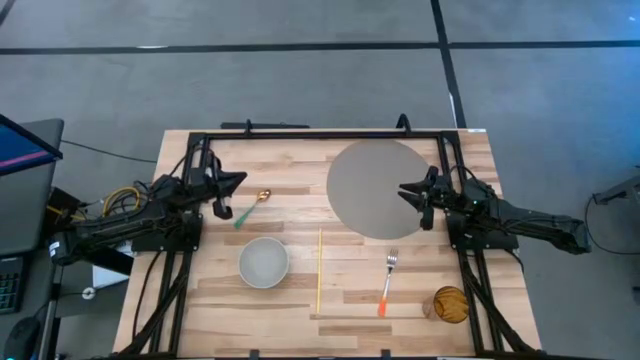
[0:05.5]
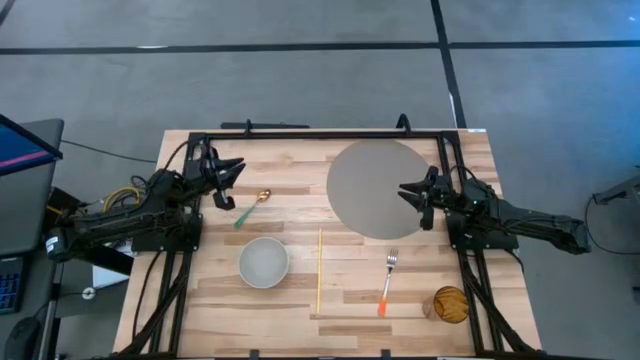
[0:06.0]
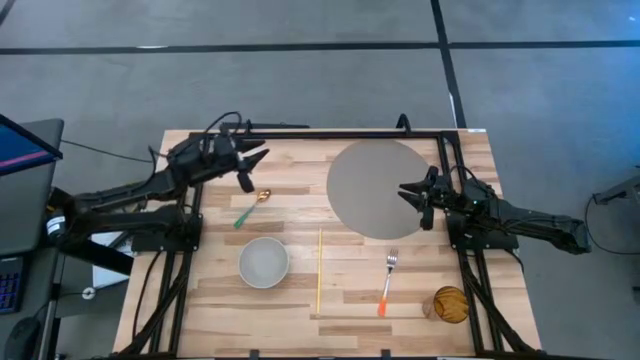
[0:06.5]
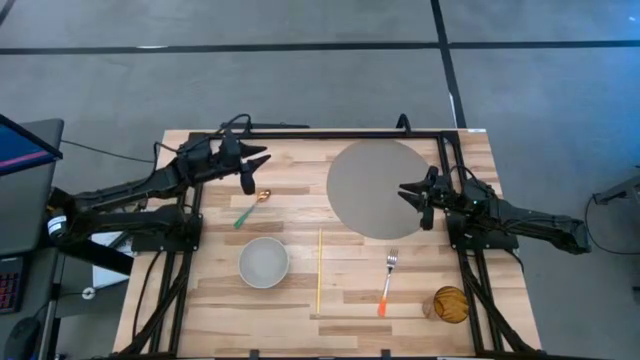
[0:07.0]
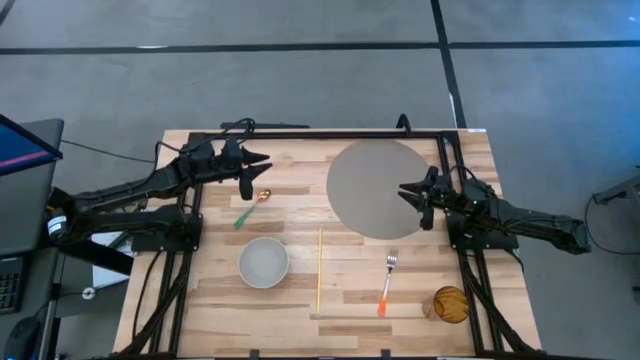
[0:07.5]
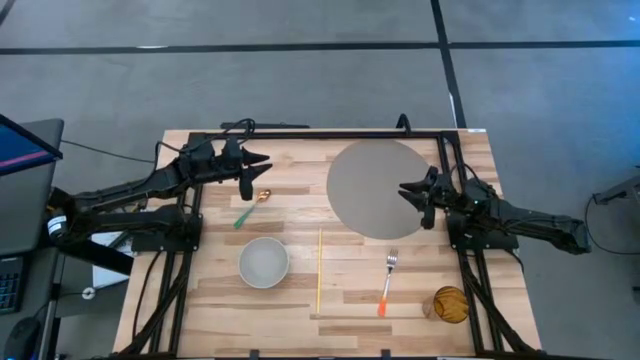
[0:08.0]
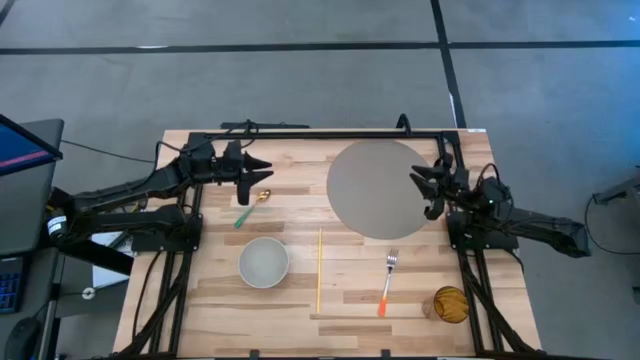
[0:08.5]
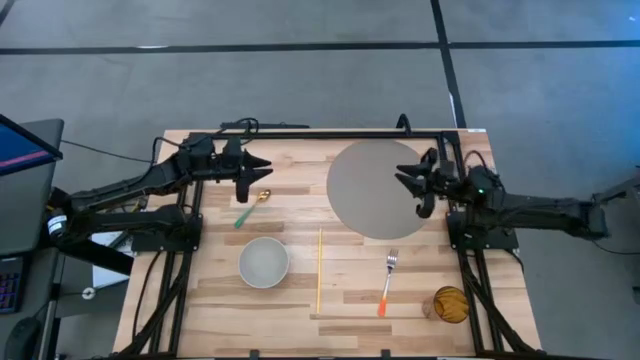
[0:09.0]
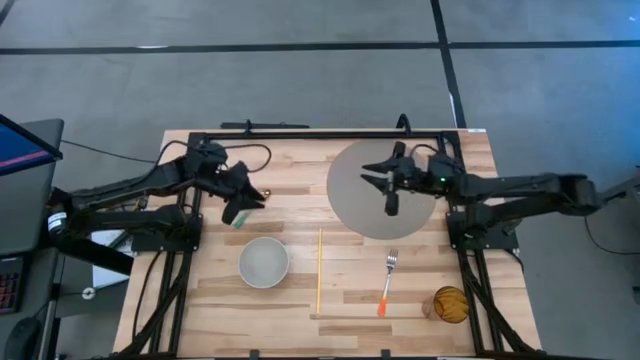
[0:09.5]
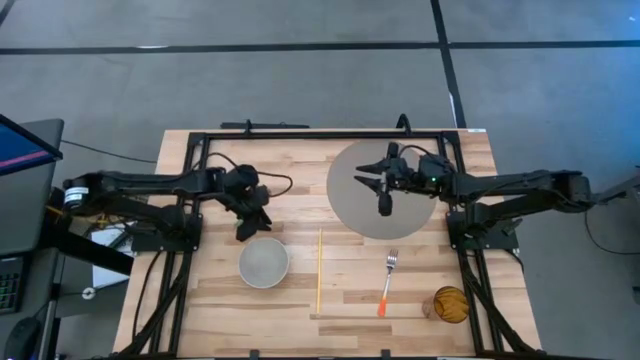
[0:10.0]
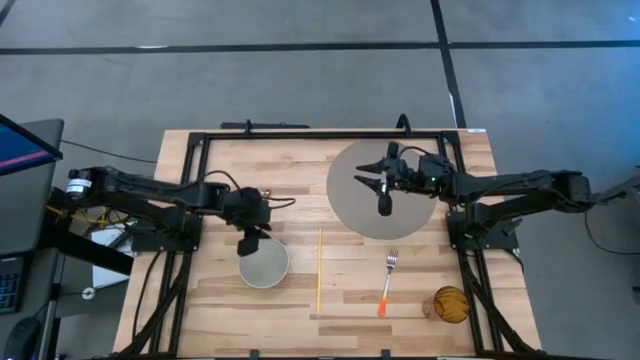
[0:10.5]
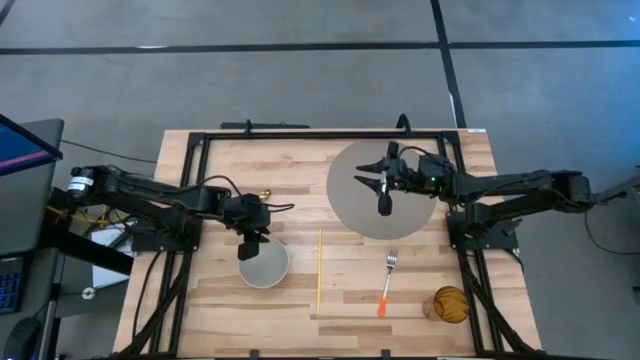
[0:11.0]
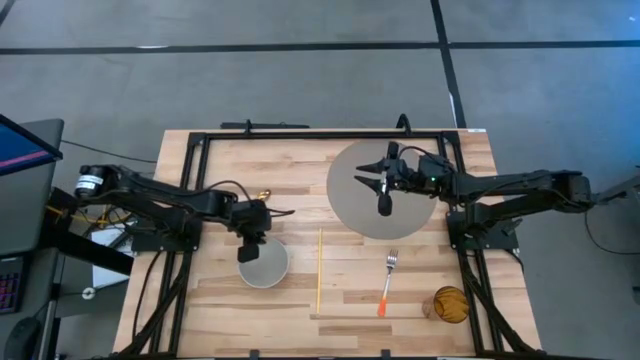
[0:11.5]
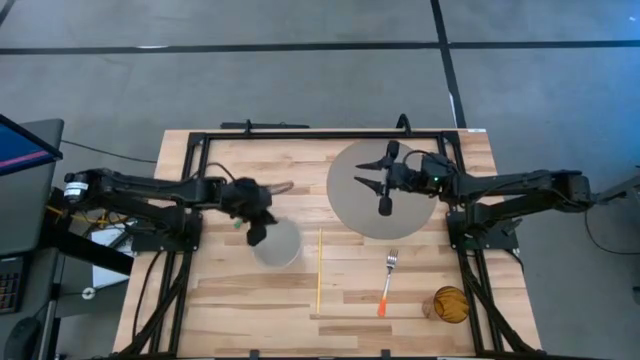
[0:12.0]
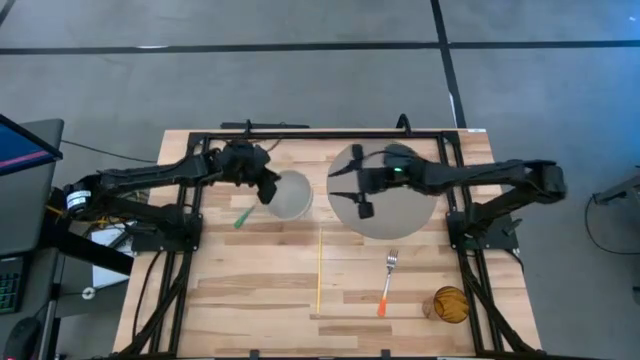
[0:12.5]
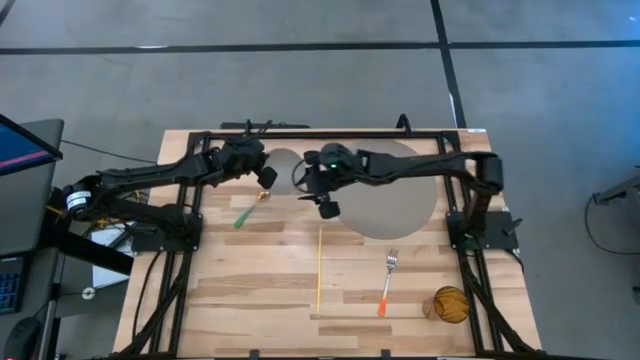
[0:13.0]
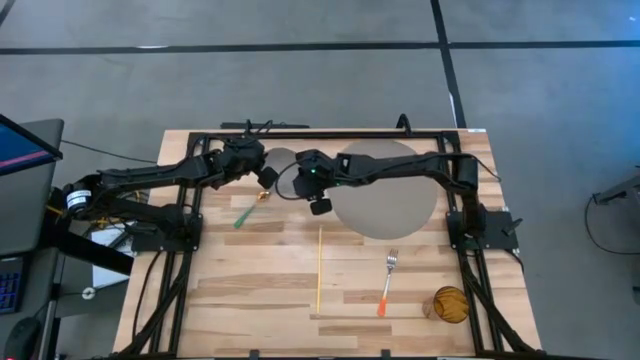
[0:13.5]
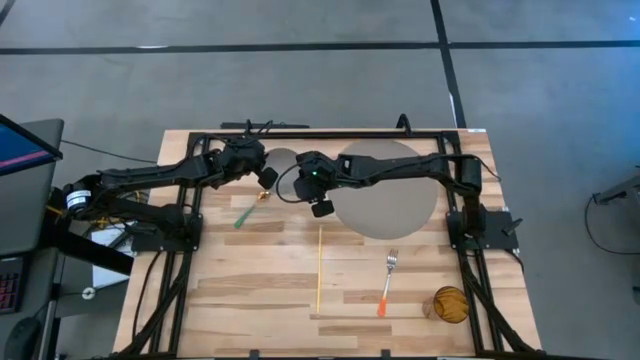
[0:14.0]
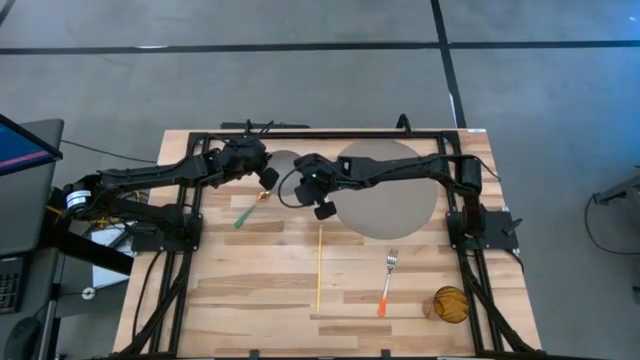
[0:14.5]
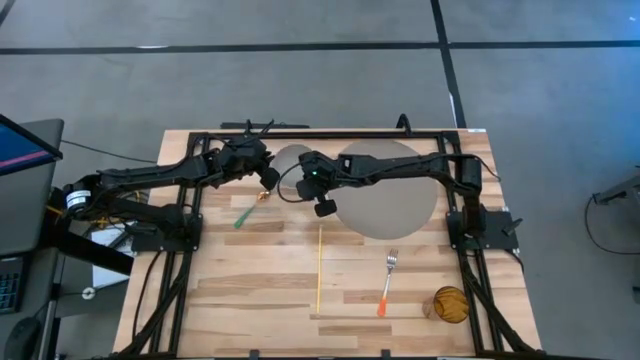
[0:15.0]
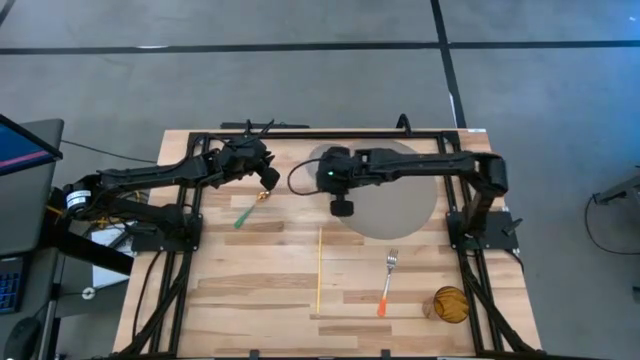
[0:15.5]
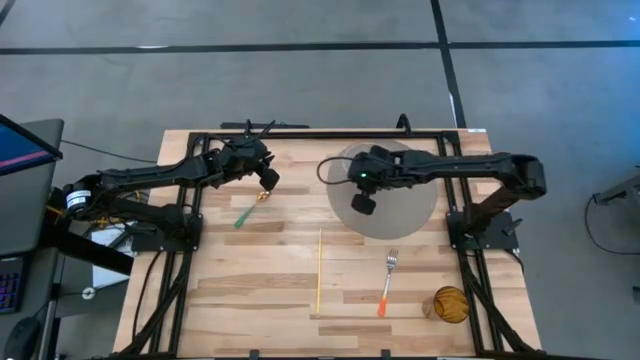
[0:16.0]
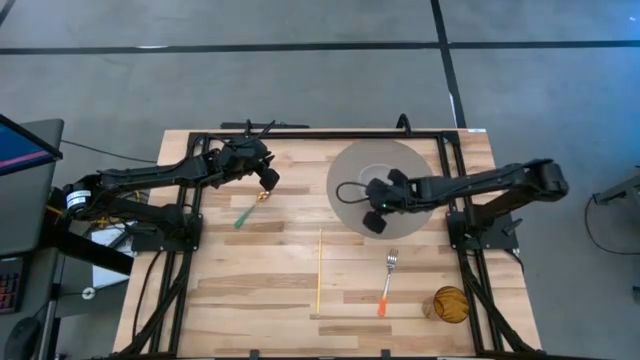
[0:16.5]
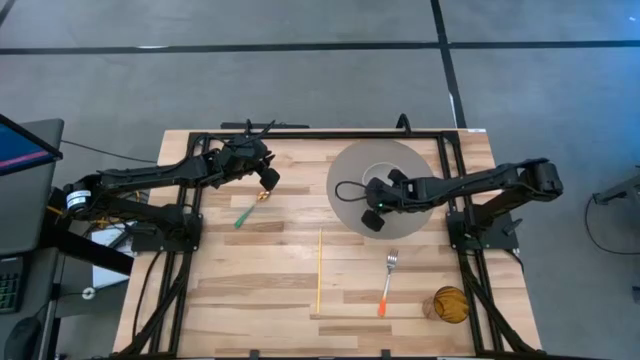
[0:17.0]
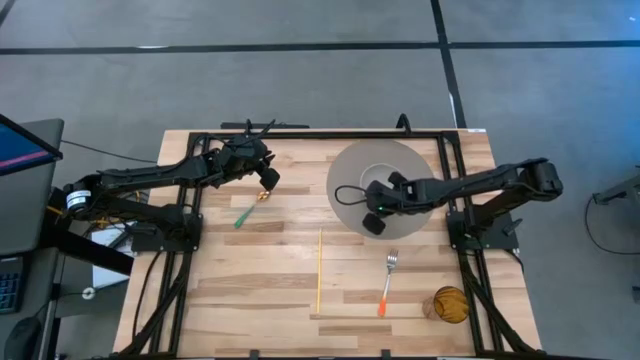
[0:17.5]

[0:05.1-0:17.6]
Task: Pick & Place Utensil
Put the gray bowl on the gray mat

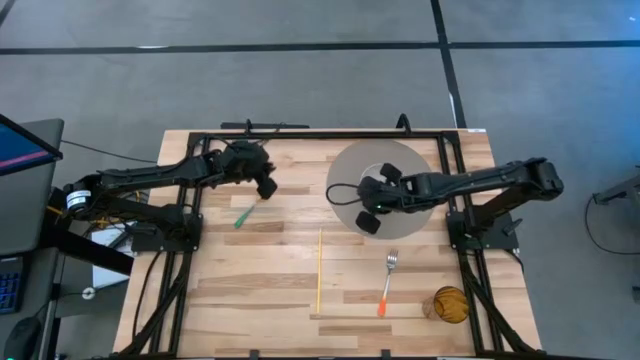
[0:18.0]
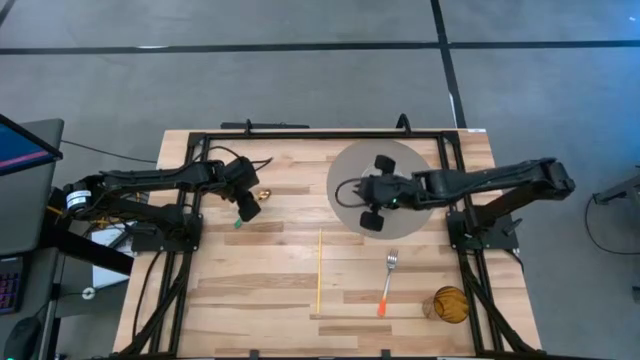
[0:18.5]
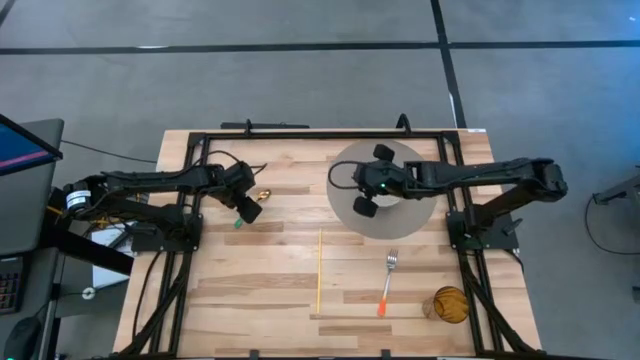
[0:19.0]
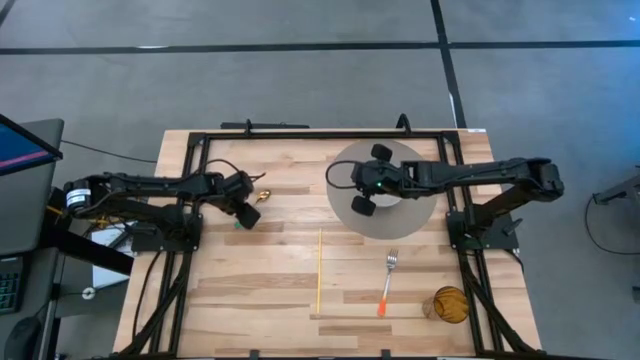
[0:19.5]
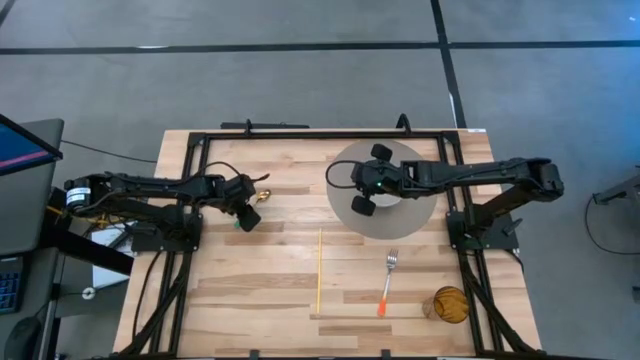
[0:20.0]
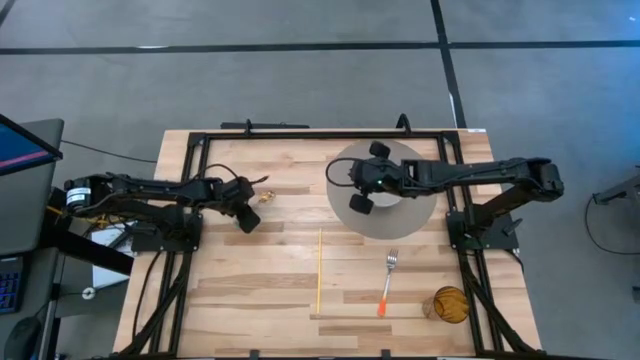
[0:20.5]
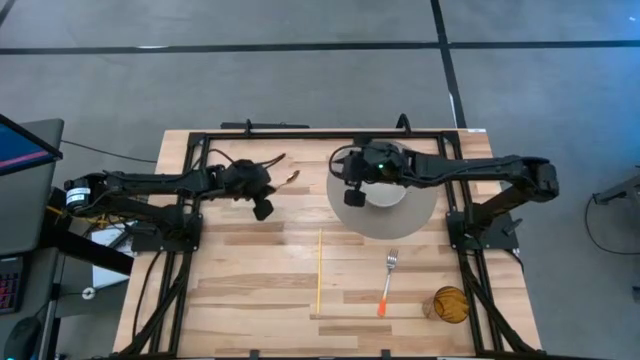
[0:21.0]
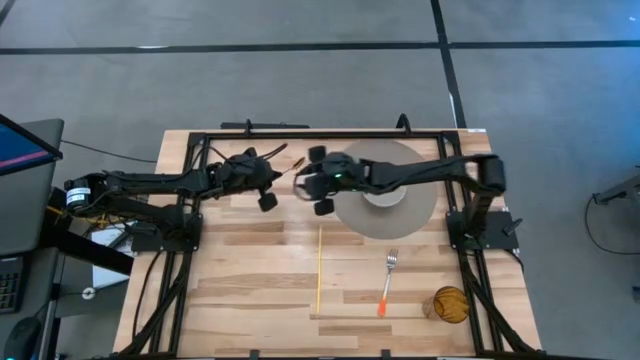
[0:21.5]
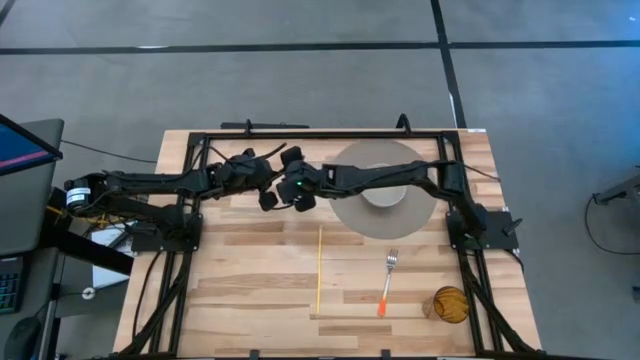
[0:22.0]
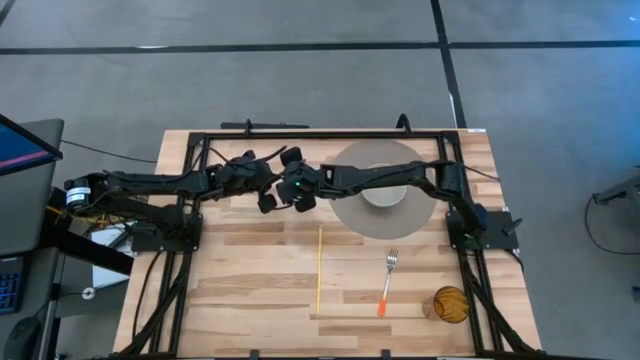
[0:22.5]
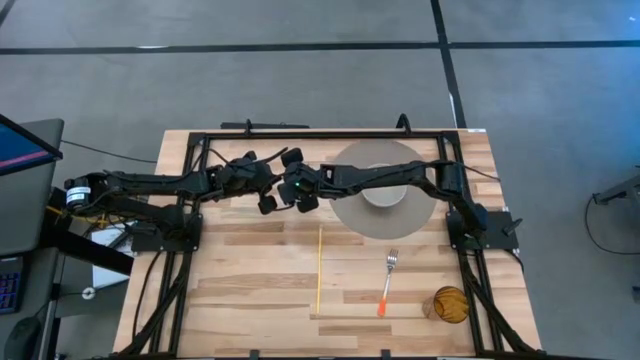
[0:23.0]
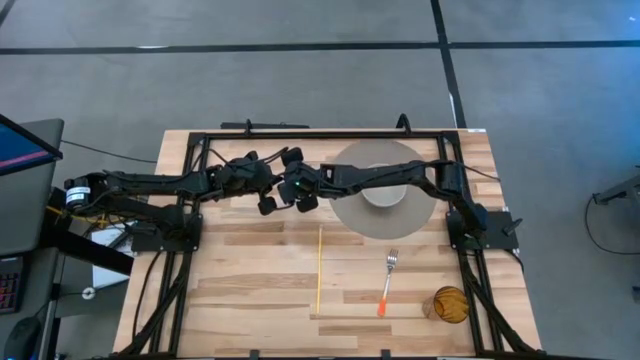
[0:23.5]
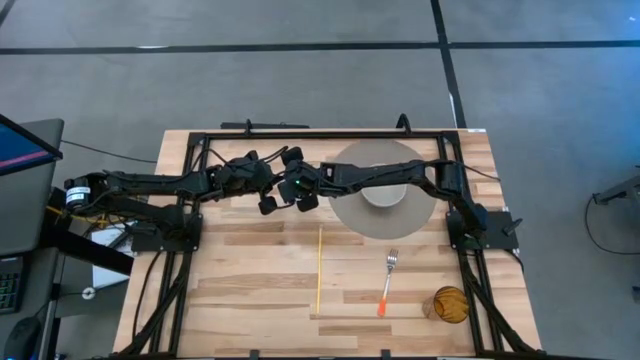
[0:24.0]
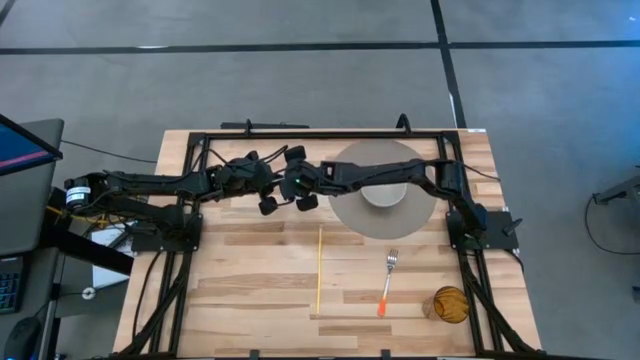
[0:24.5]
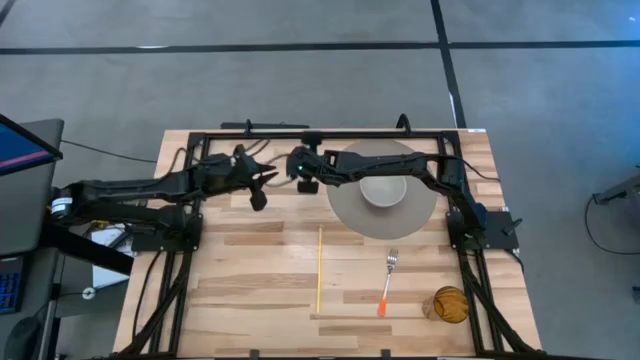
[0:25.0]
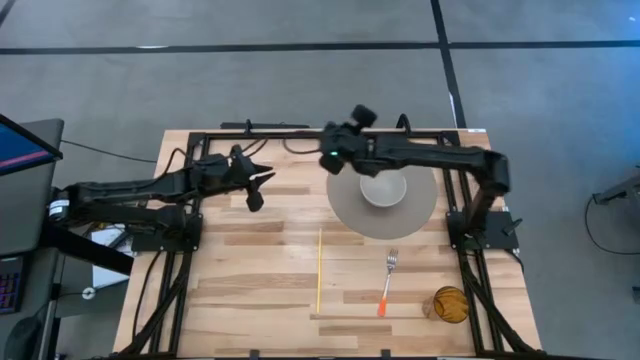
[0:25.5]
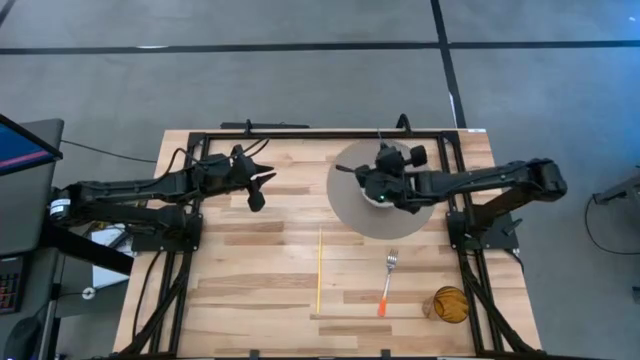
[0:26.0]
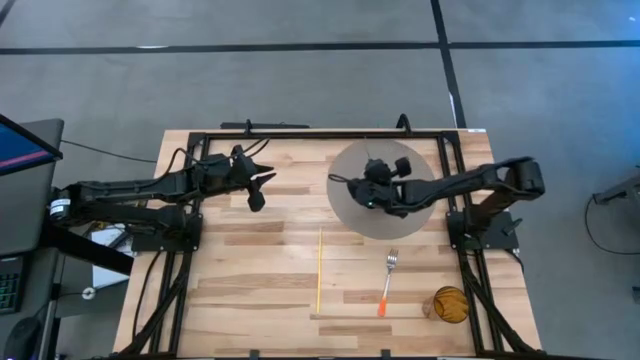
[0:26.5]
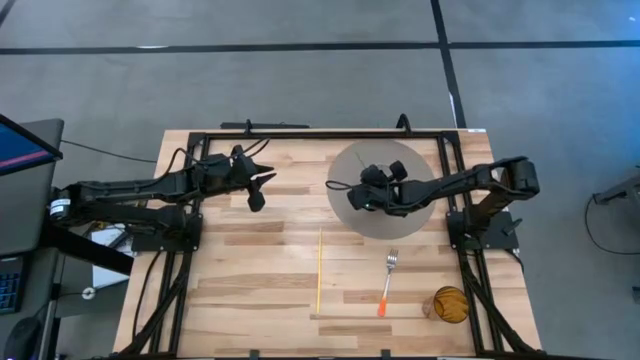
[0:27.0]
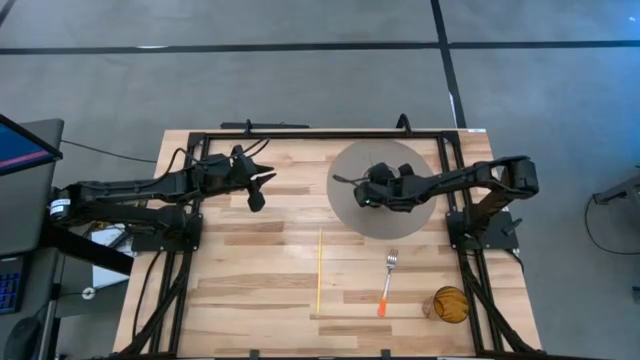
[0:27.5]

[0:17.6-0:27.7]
Put the green spoon into the gray bowl on the gray mat
